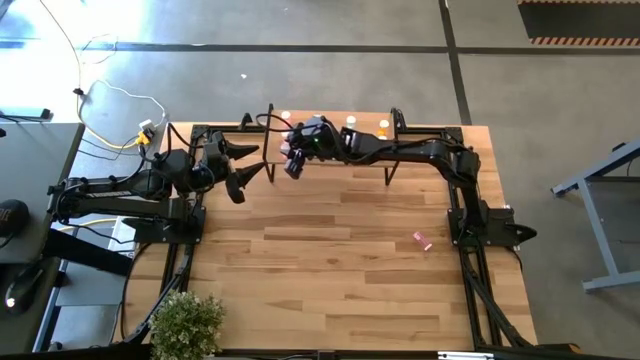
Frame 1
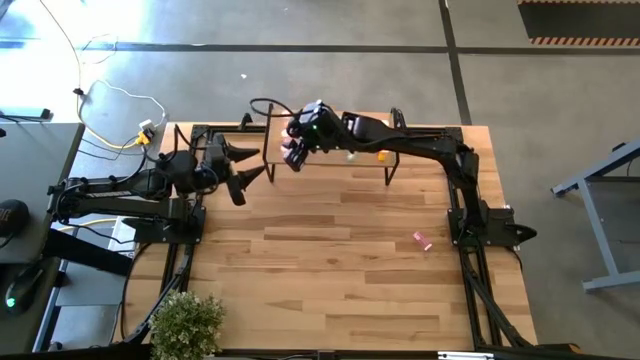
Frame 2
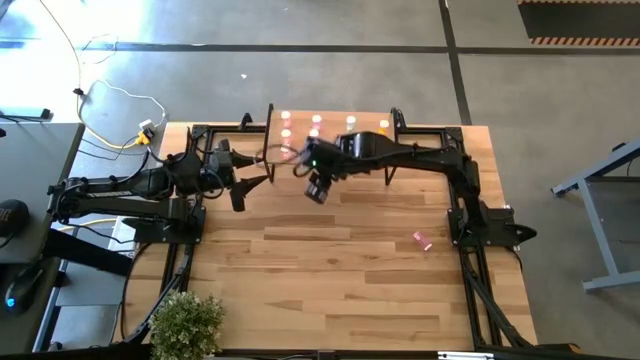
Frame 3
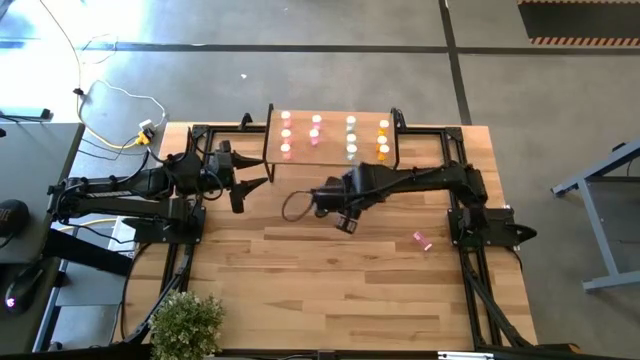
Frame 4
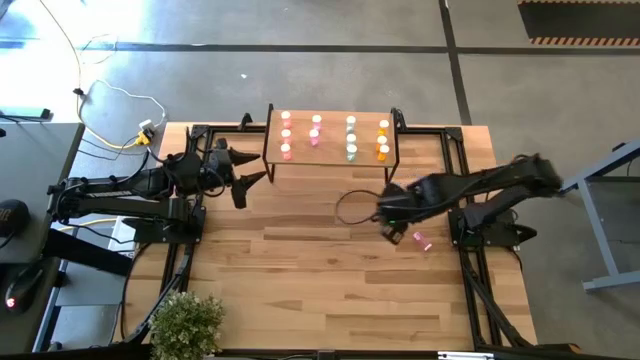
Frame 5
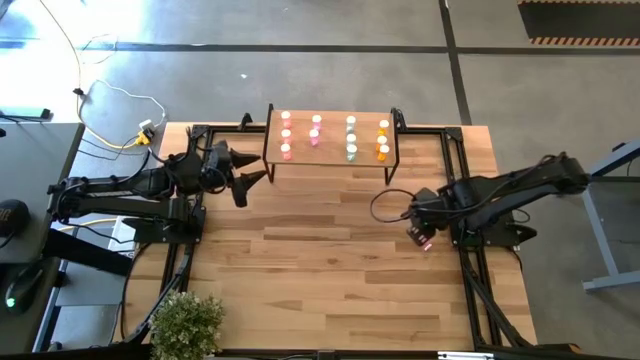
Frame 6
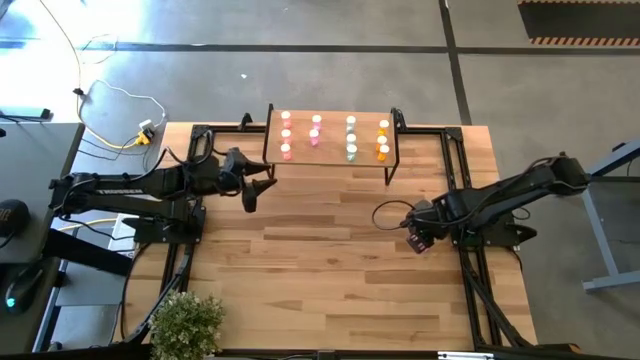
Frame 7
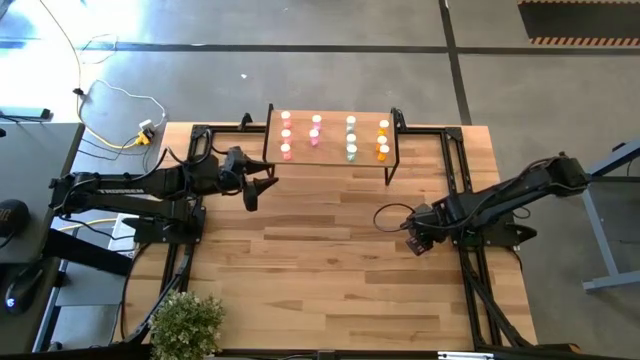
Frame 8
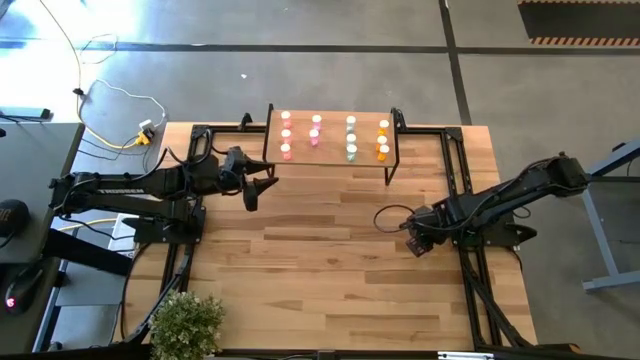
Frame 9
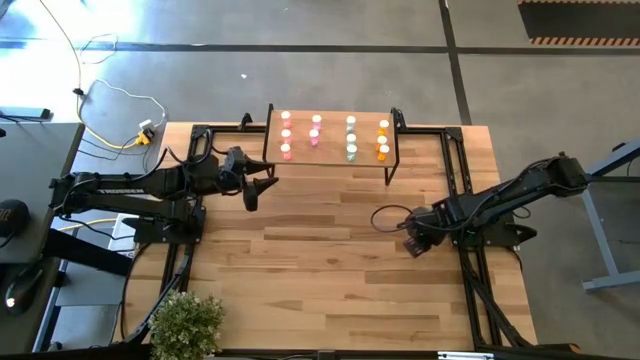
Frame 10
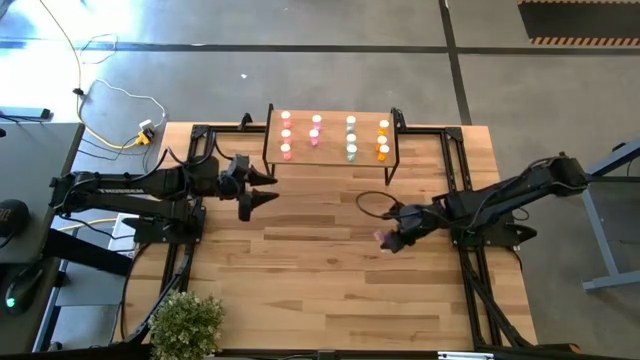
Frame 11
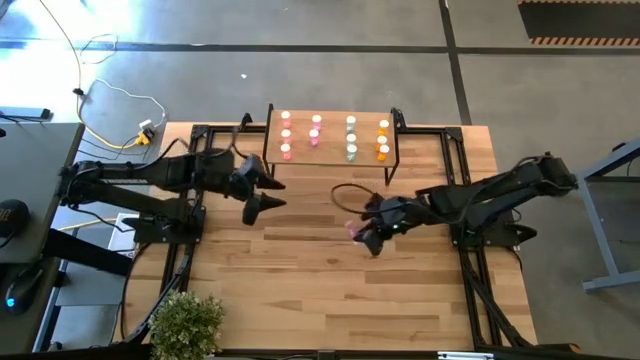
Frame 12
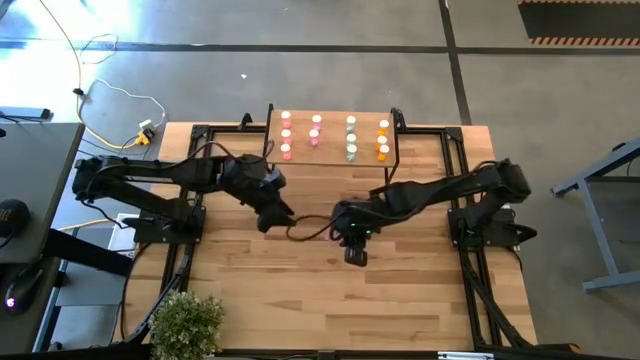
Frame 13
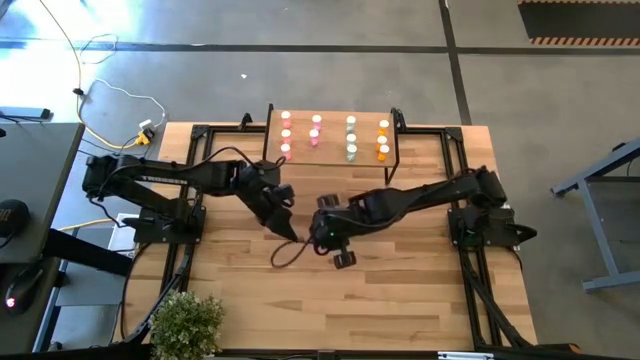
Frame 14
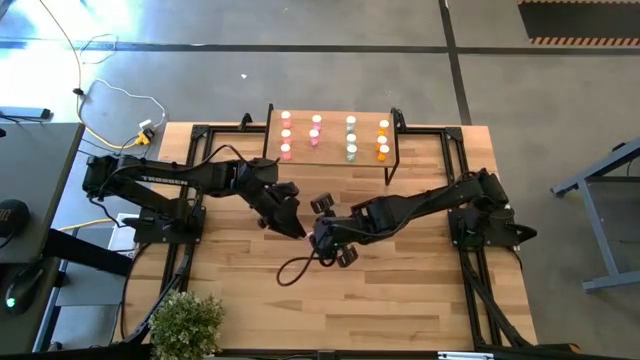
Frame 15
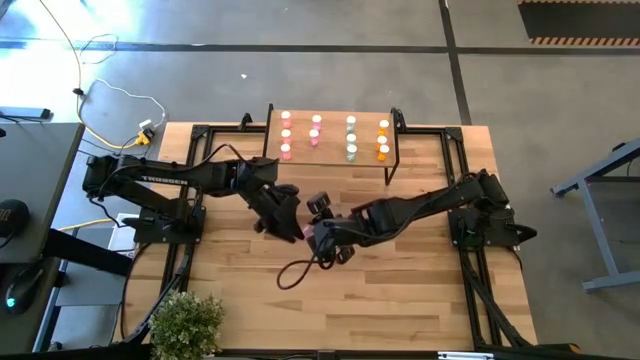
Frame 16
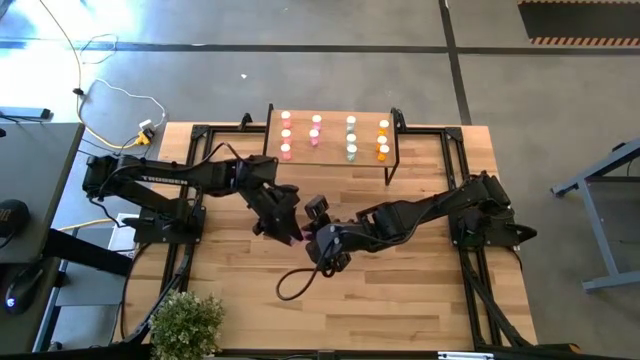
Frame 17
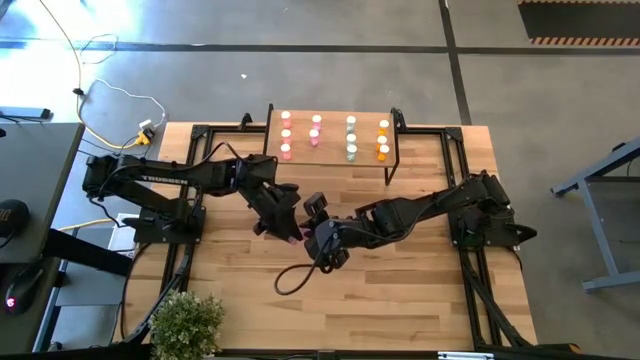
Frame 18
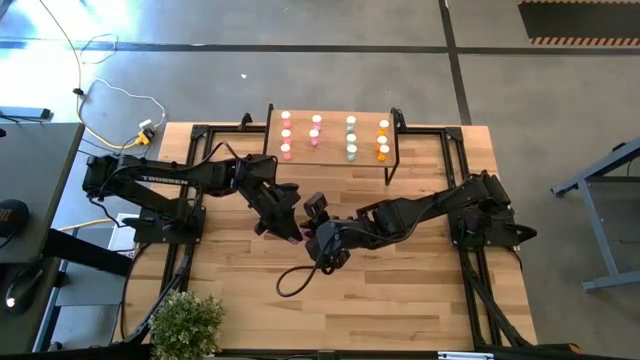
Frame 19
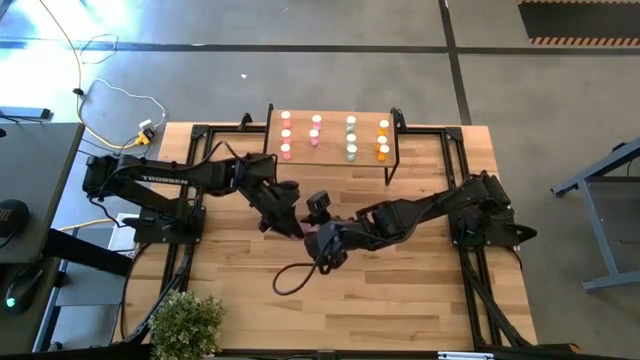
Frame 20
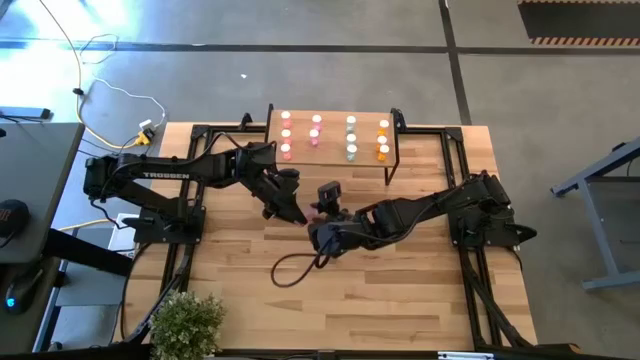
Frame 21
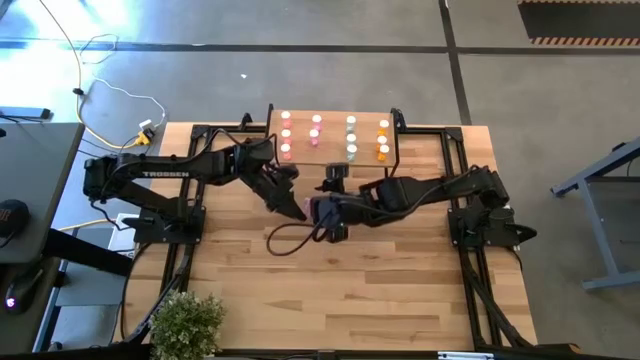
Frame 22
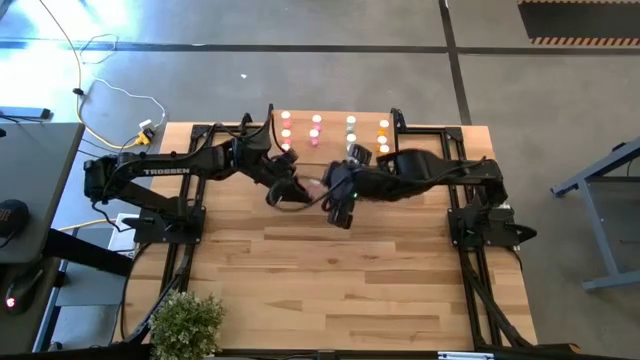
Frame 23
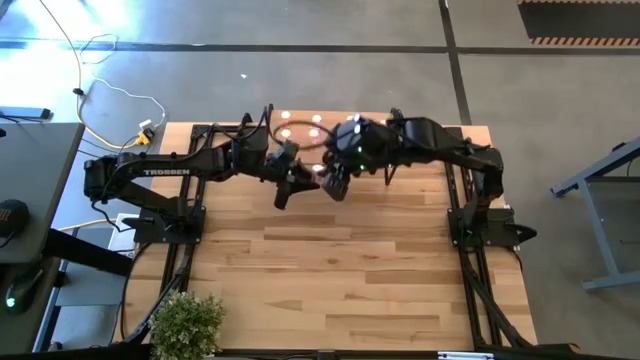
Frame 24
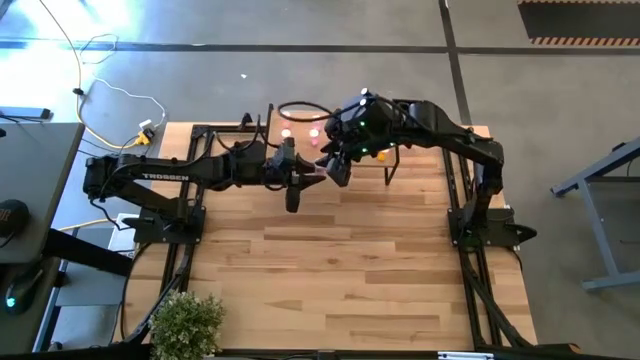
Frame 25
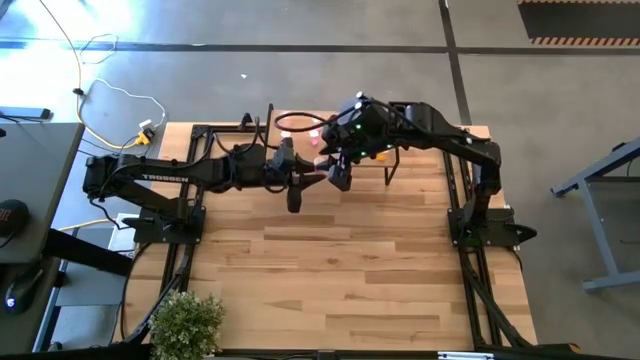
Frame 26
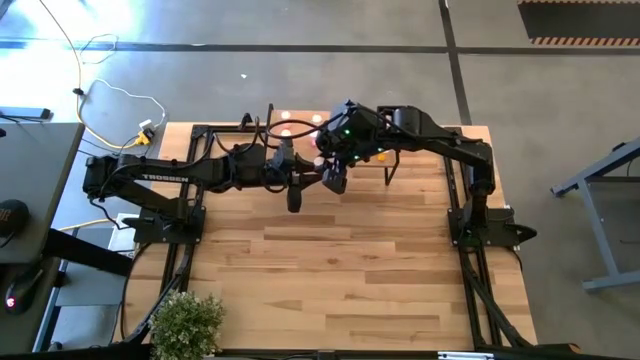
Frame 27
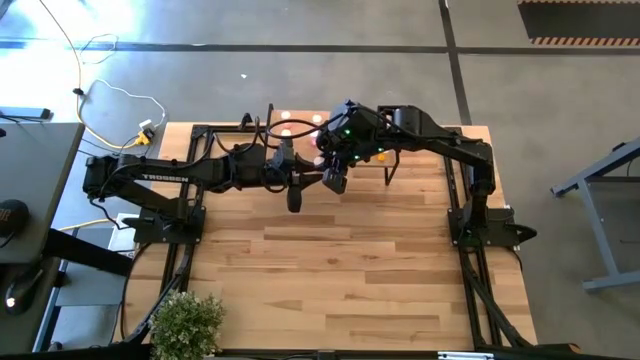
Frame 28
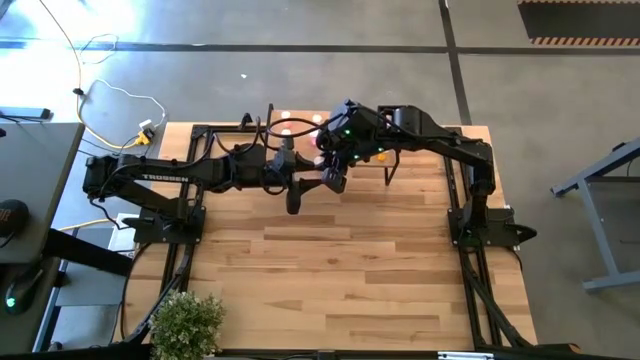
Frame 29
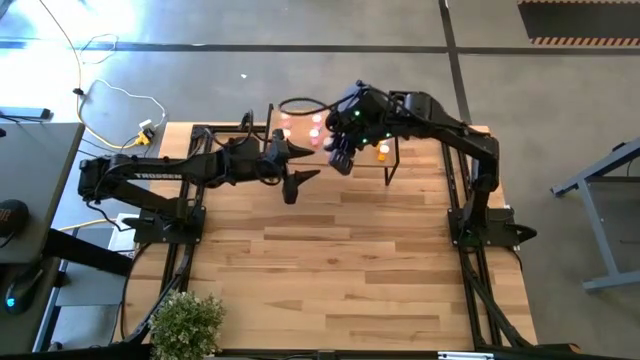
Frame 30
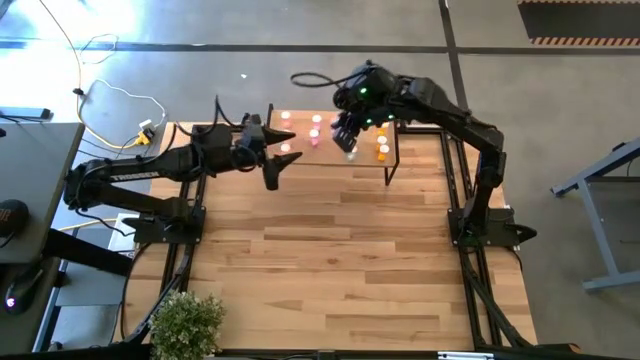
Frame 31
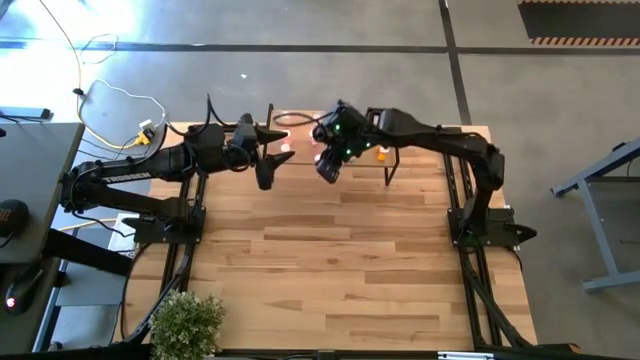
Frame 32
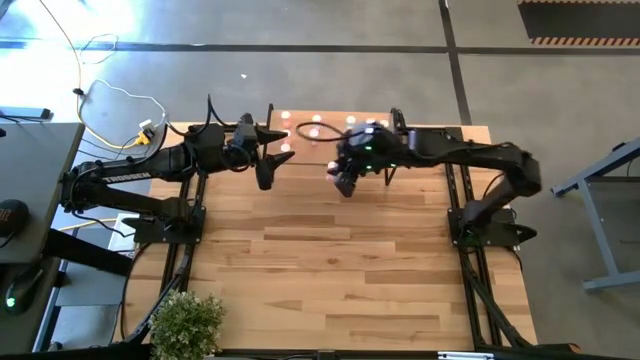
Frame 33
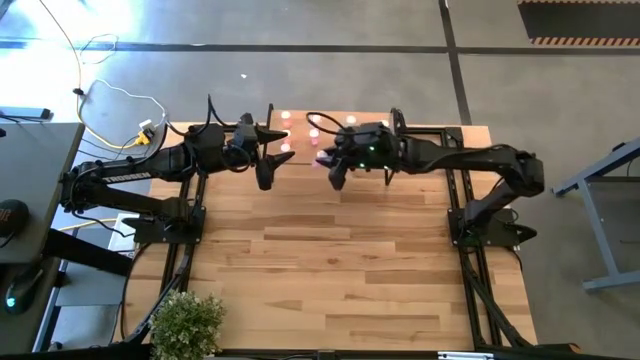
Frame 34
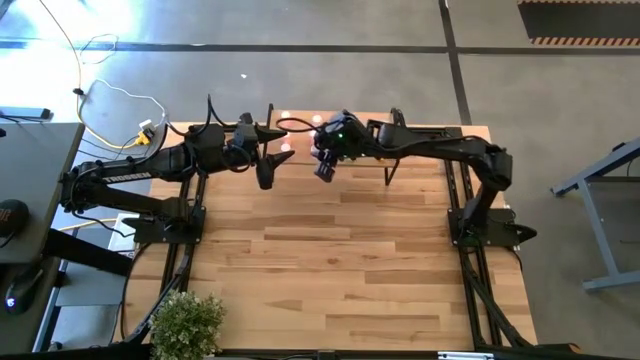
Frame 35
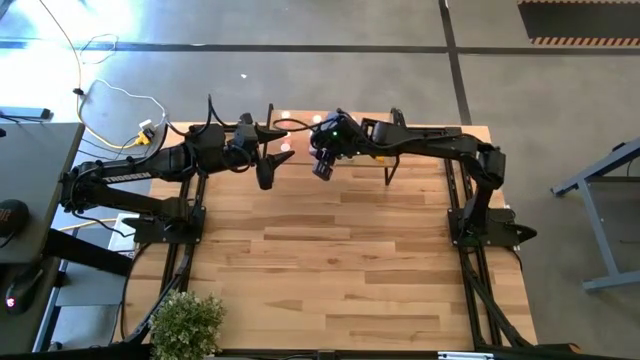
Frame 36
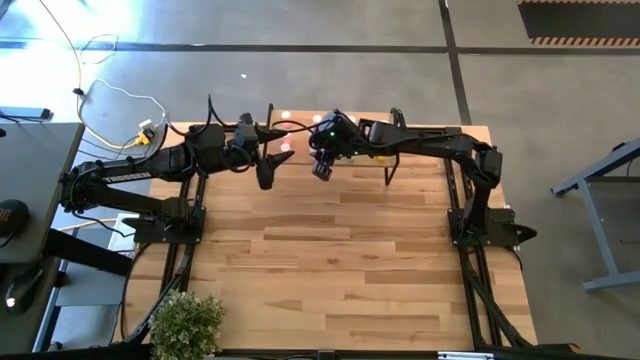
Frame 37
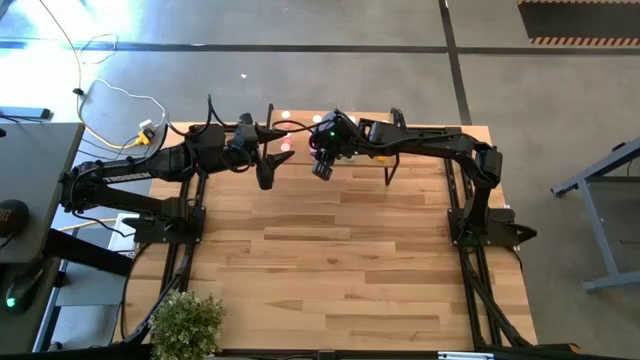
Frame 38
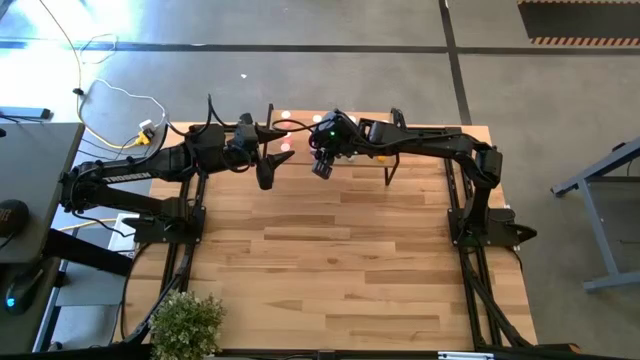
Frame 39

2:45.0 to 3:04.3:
Task: Pick and place medicine bottles onto shelf by color
Put the violet pill bottle on the shelf aligned with the other violet pill bottle
